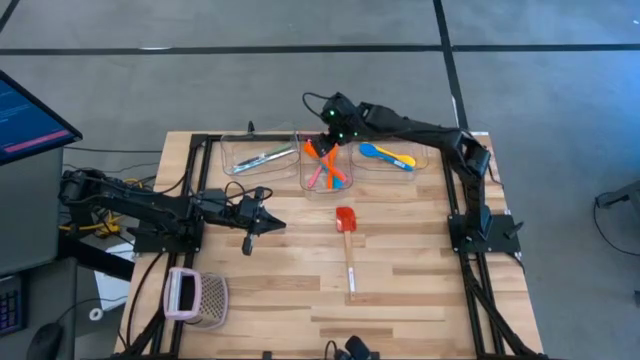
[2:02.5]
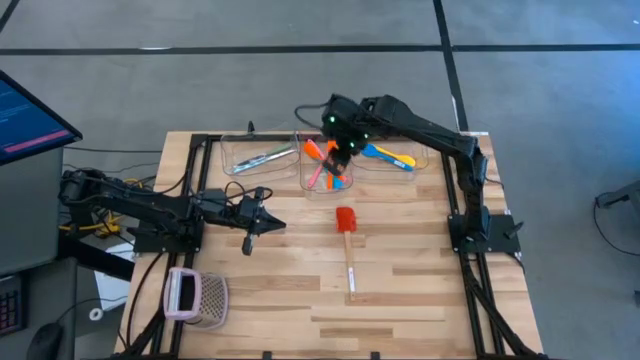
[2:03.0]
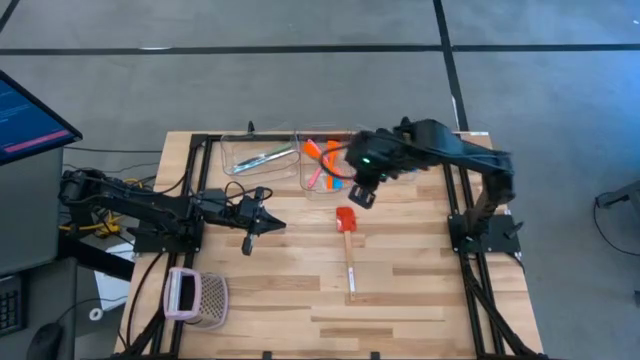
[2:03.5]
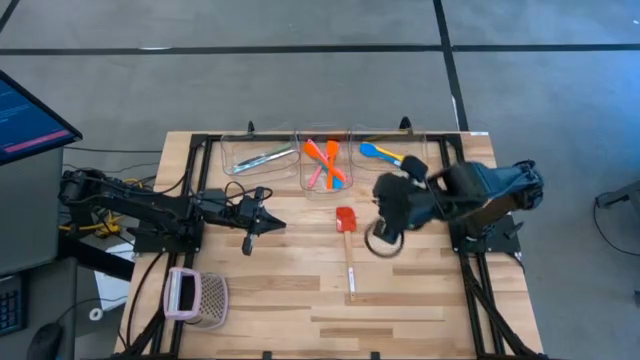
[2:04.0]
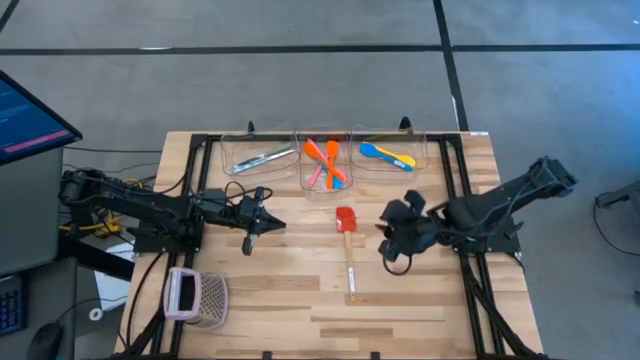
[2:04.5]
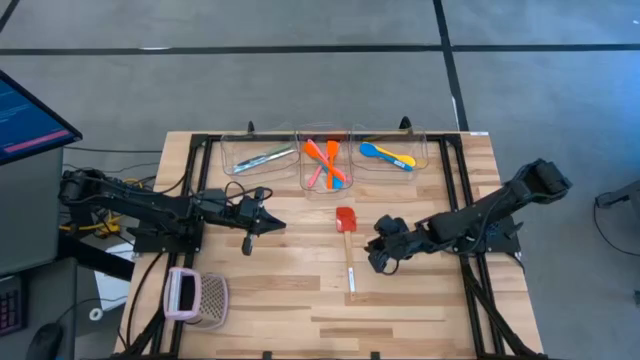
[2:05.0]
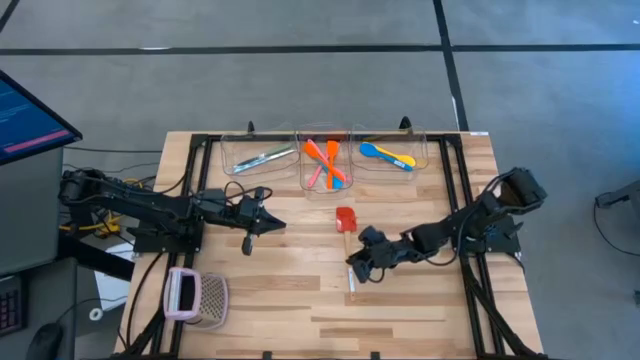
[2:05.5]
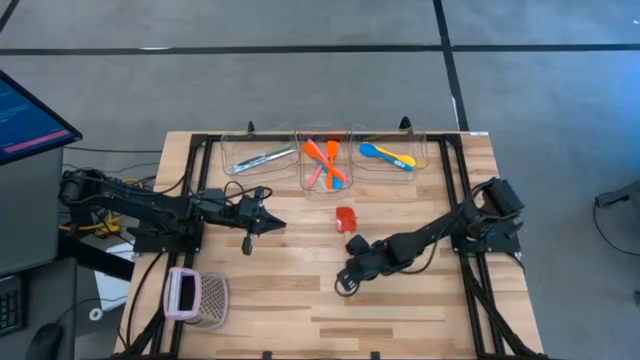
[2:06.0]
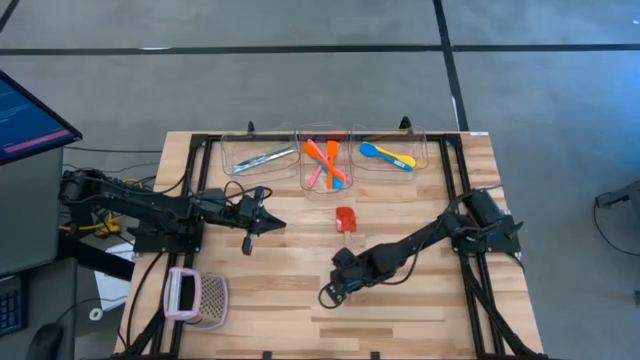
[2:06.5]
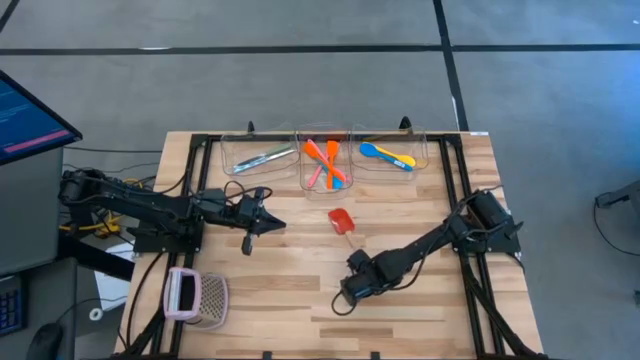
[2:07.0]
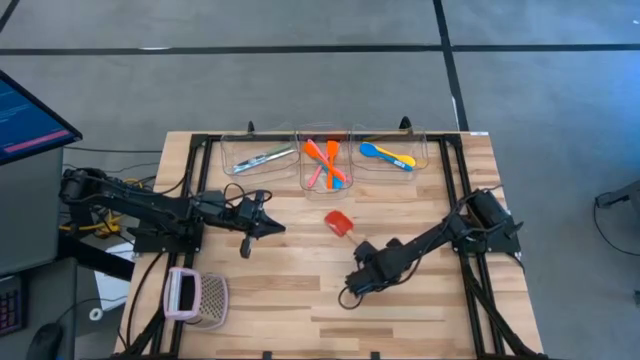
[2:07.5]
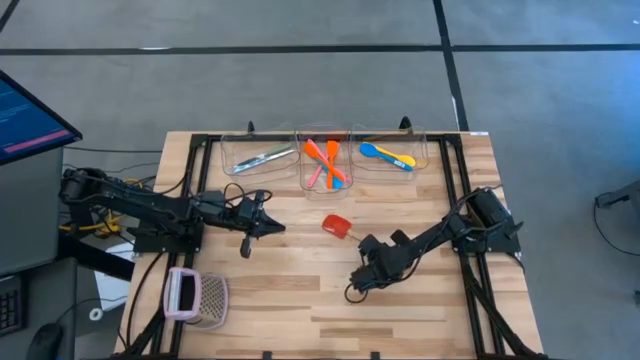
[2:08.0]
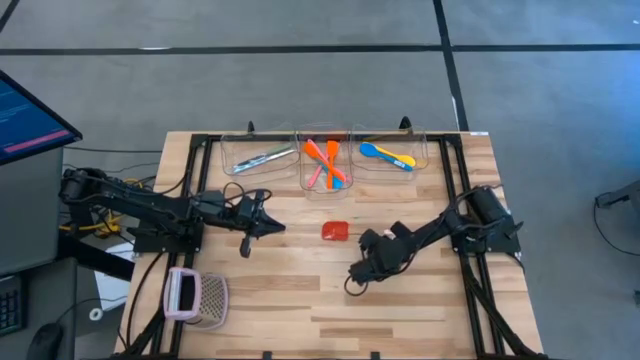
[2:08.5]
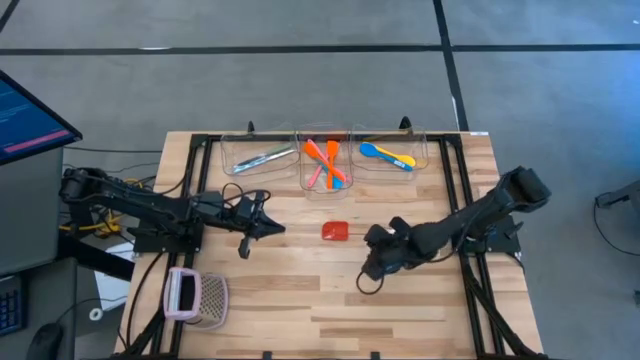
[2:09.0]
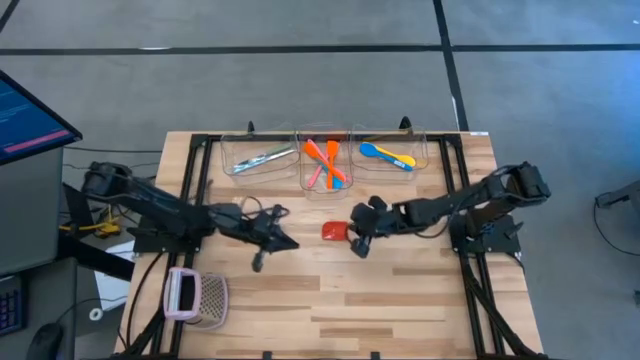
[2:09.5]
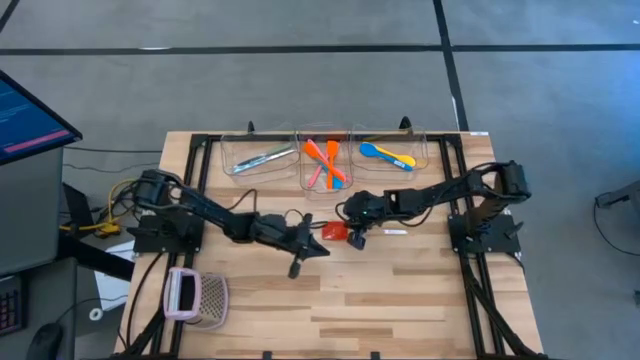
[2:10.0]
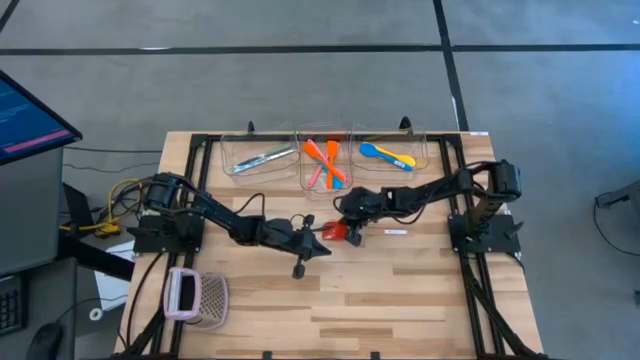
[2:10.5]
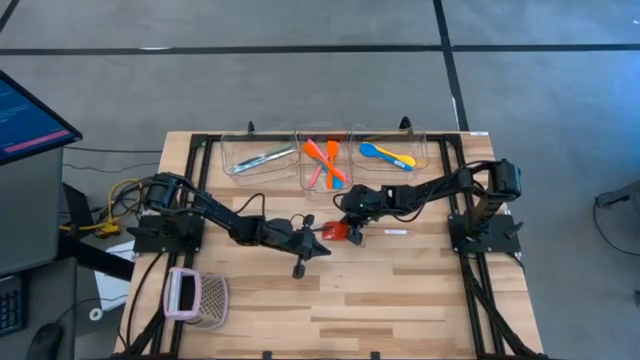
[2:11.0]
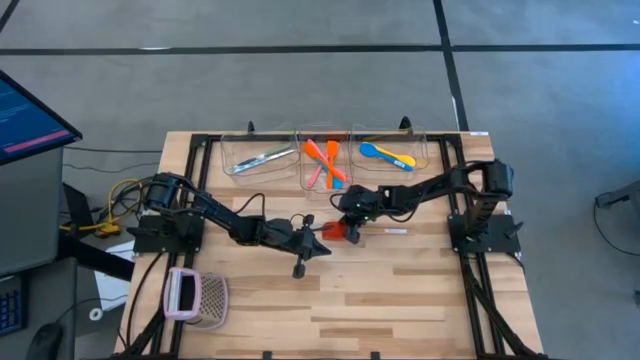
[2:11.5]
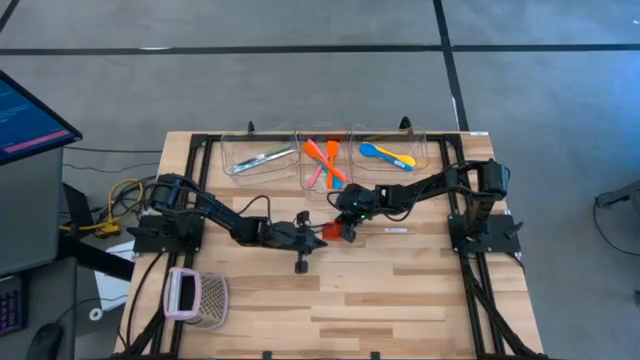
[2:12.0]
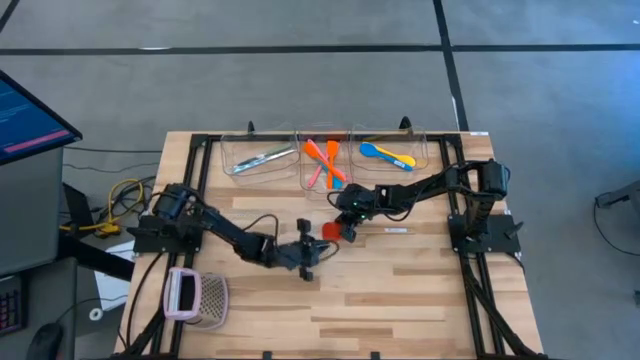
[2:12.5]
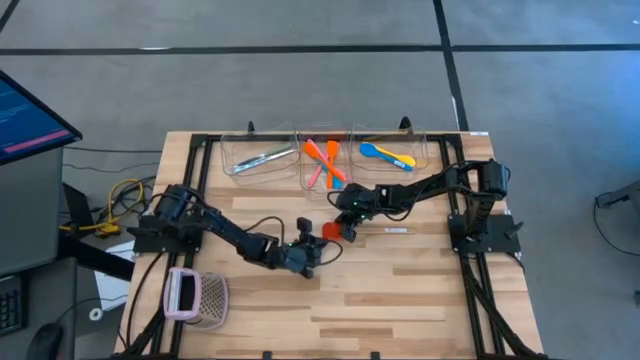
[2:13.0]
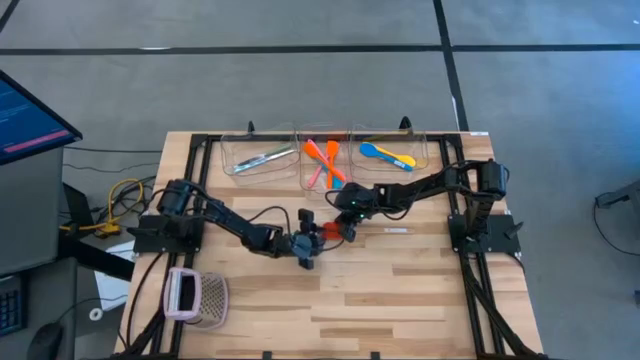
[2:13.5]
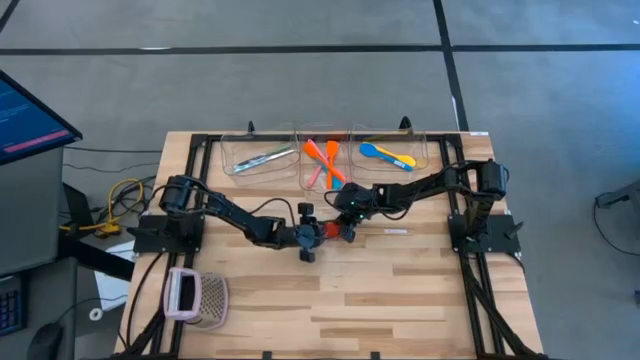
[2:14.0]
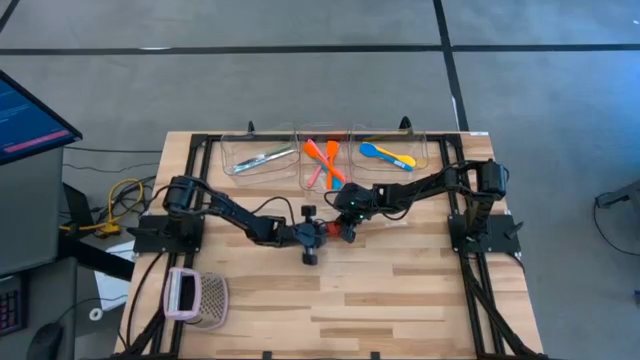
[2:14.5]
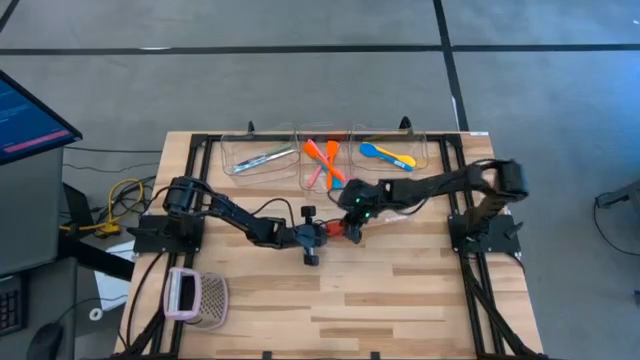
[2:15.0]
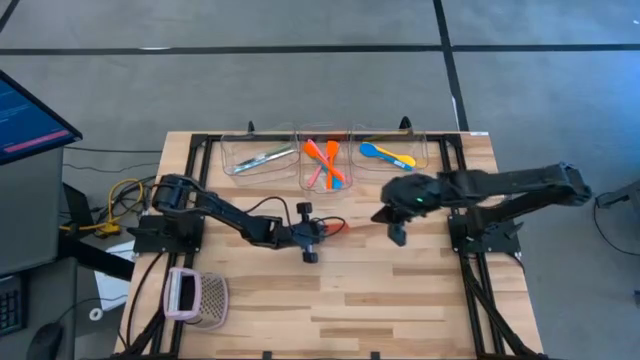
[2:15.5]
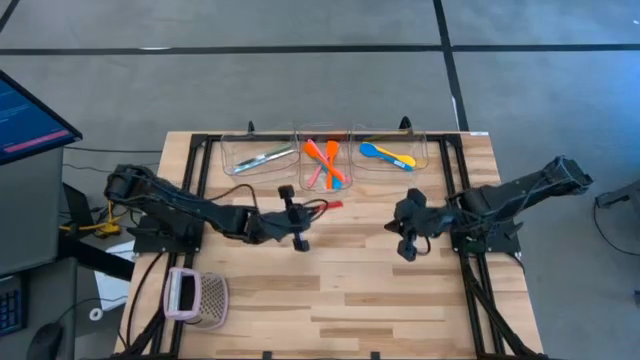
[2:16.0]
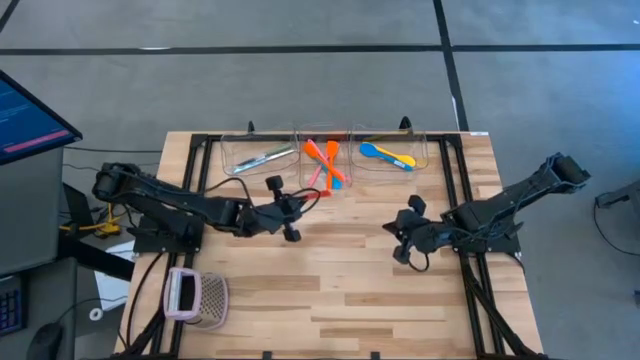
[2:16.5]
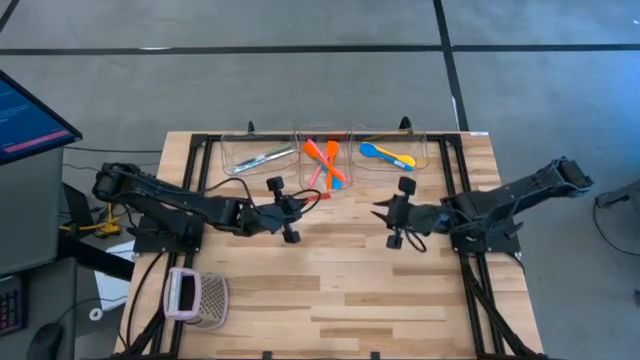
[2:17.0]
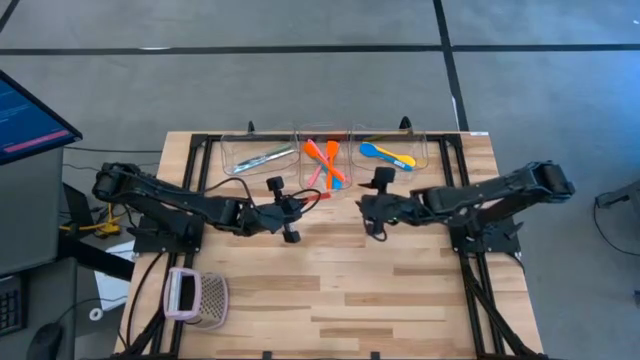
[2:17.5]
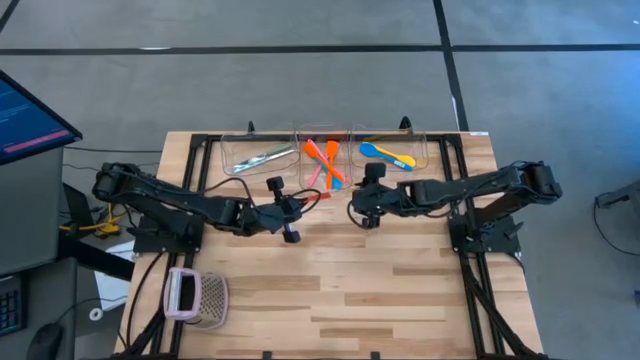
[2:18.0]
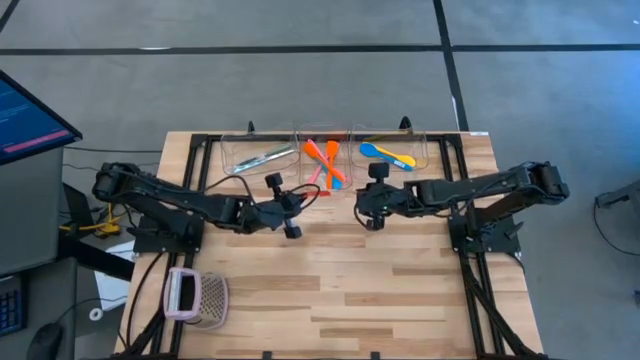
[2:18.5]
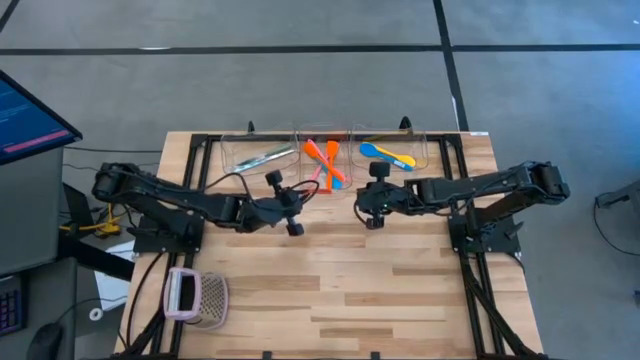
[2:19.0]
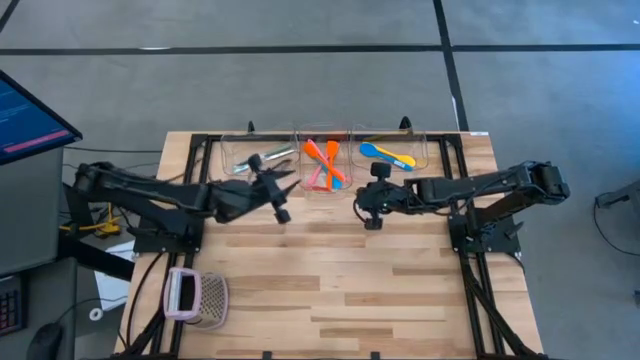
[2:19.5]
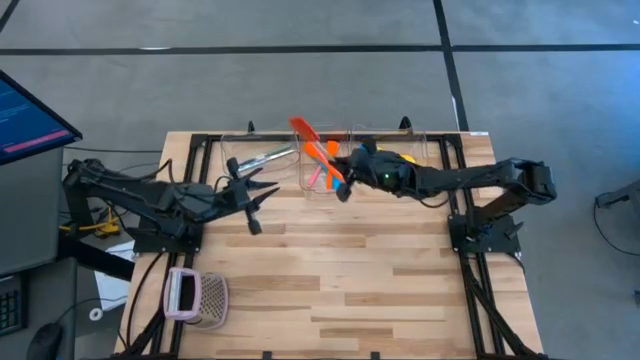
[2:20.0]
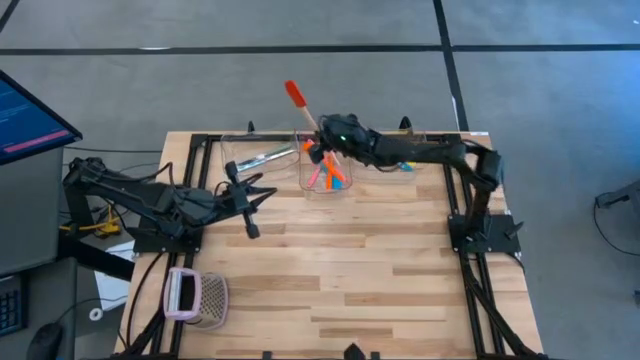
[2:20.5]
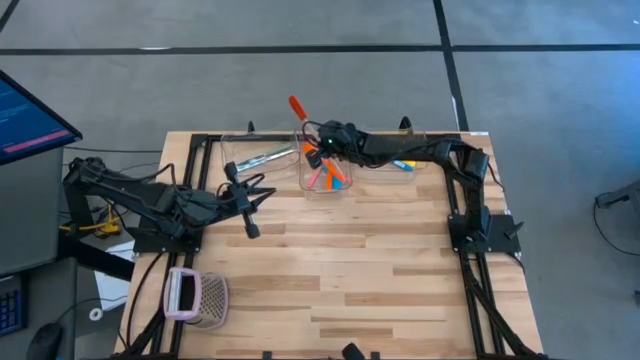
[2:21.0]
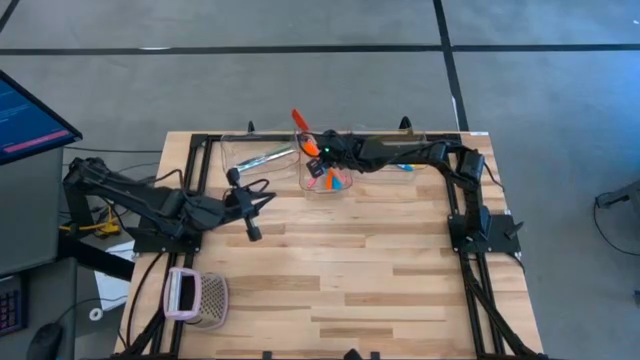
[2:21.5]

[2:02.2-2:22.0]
Task: Pick & Place Kitchen Items
Put the red spatula into the middle transparent bin

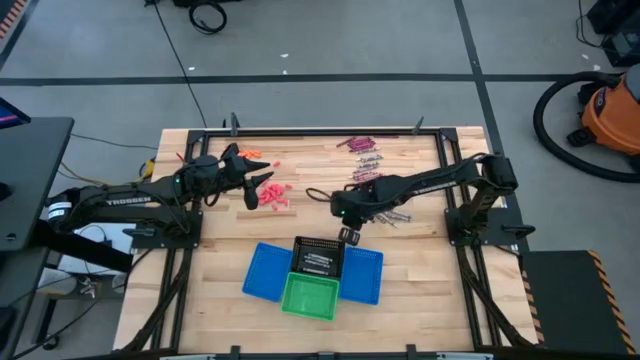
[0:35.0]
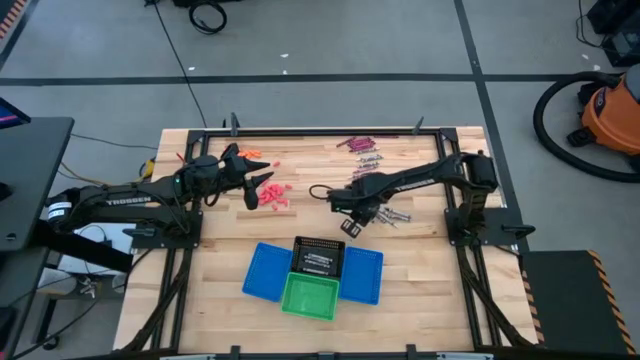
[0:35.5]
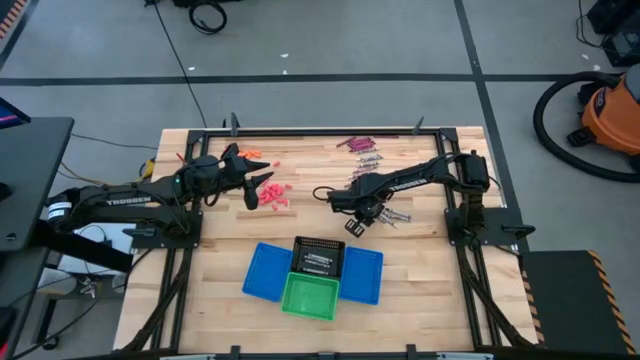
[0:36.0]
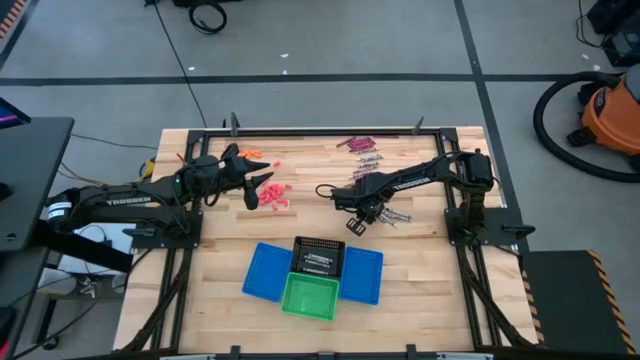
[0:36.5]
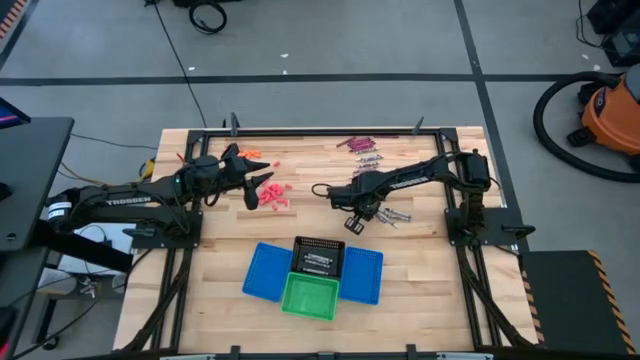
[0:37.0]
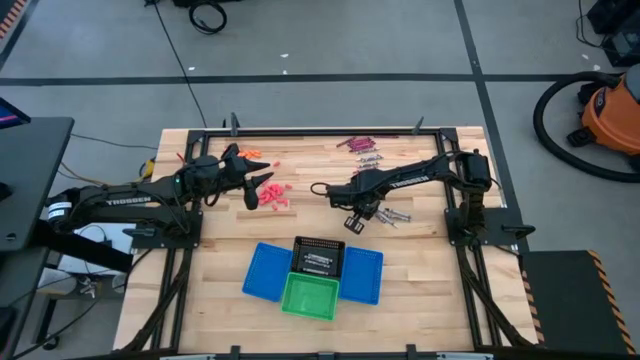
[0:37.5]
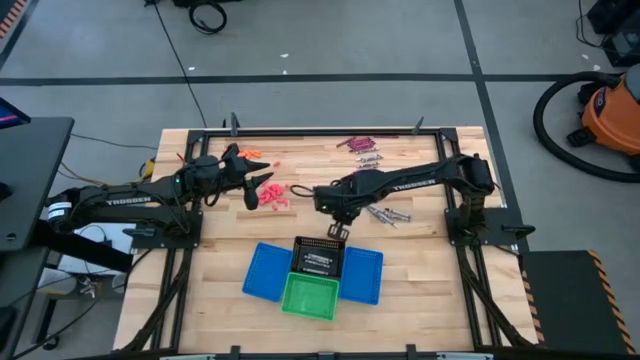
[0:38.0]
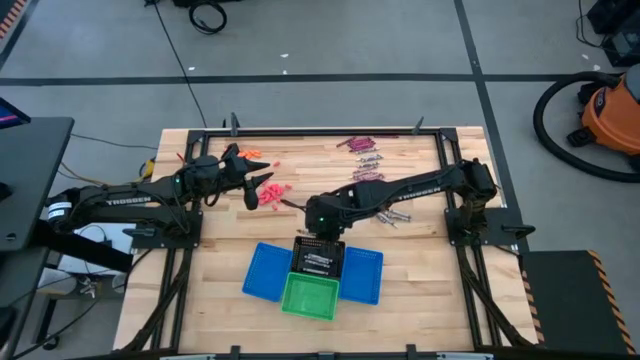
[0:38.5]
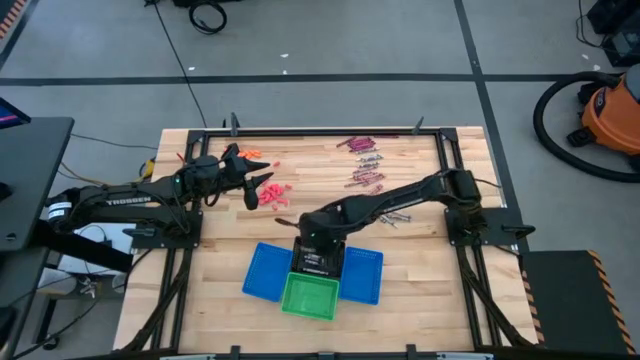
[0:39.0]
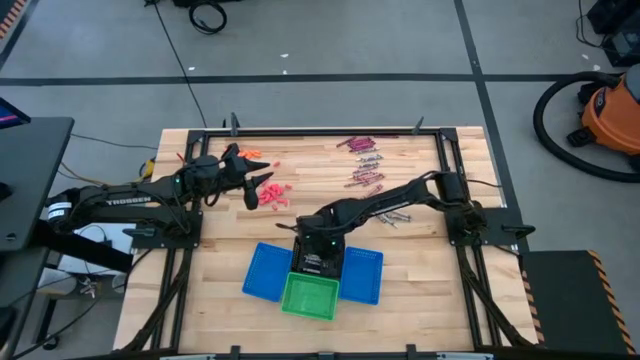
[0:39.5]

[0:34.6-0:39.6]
Task: Sort crayons
Put the black crayon into the black bin
